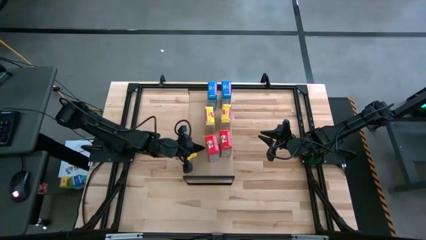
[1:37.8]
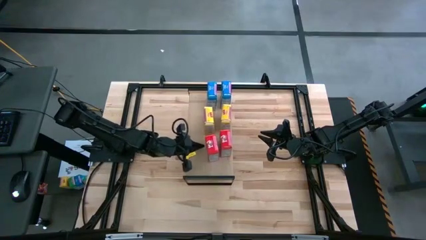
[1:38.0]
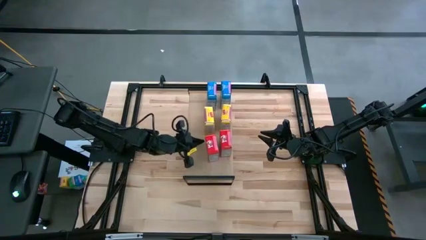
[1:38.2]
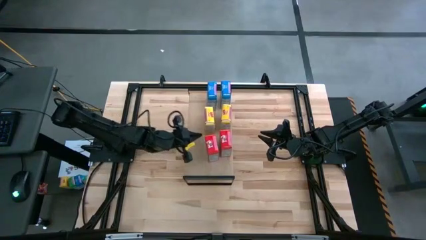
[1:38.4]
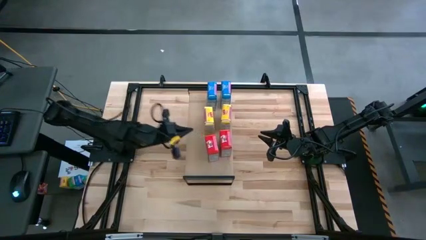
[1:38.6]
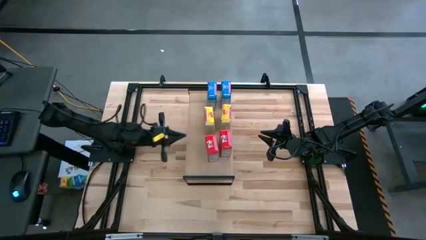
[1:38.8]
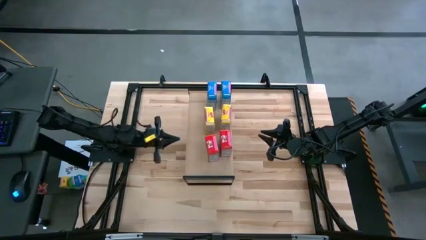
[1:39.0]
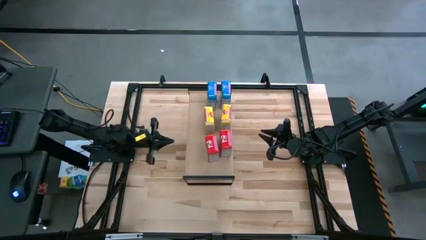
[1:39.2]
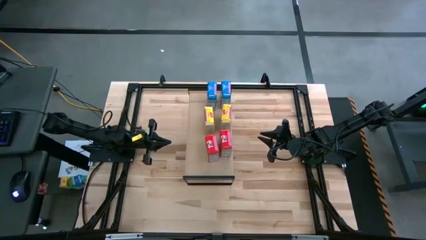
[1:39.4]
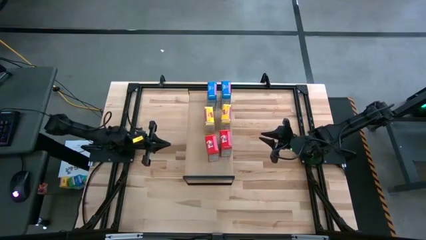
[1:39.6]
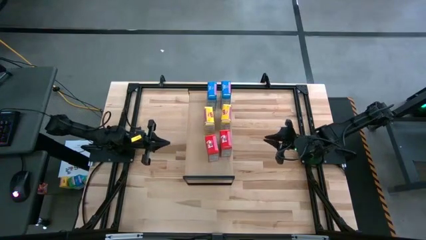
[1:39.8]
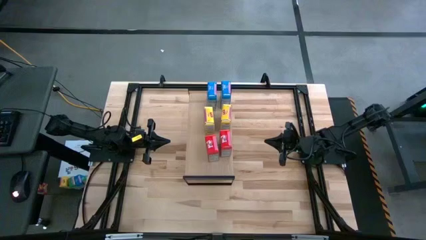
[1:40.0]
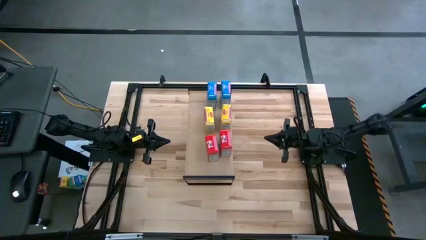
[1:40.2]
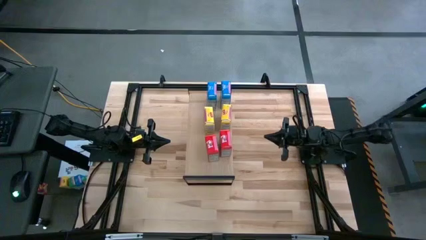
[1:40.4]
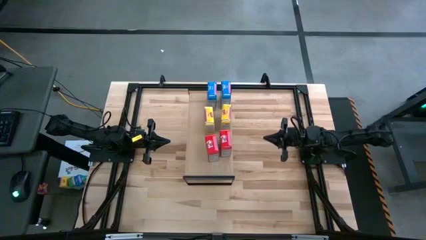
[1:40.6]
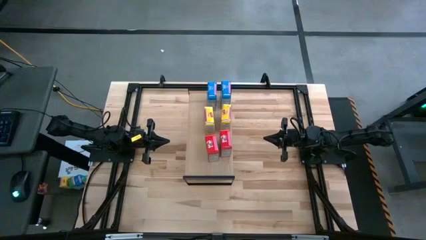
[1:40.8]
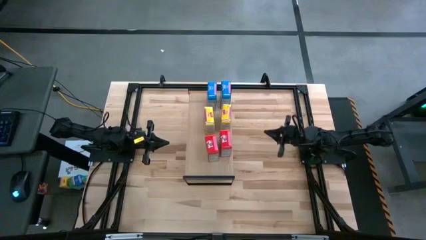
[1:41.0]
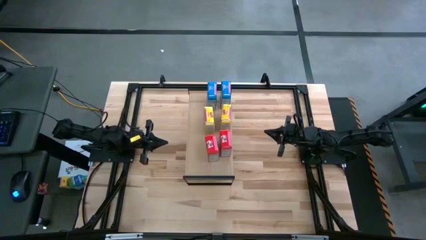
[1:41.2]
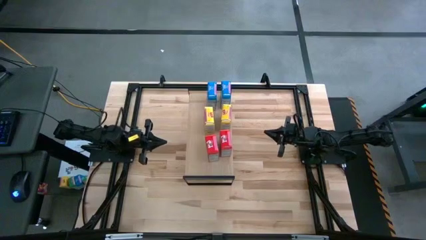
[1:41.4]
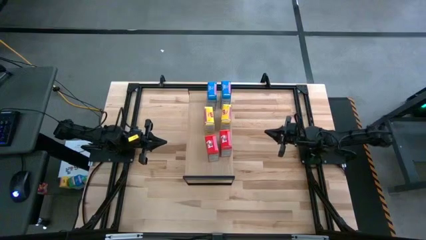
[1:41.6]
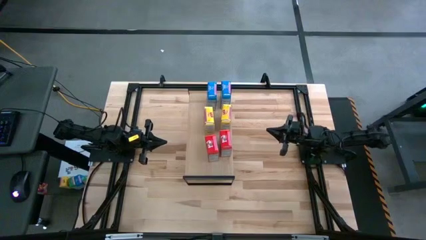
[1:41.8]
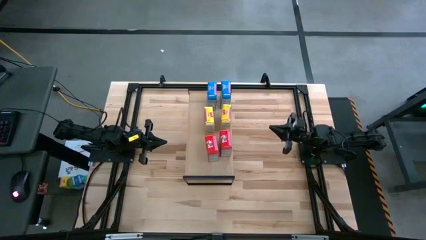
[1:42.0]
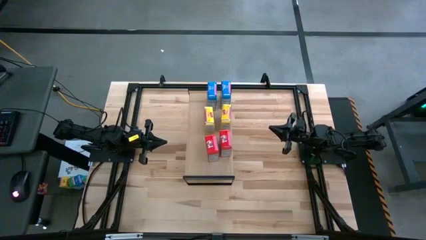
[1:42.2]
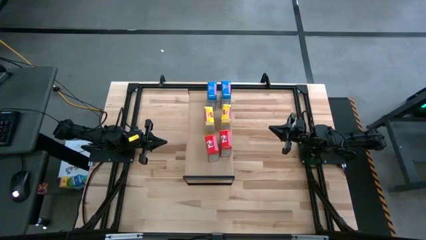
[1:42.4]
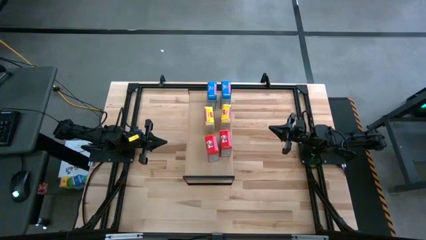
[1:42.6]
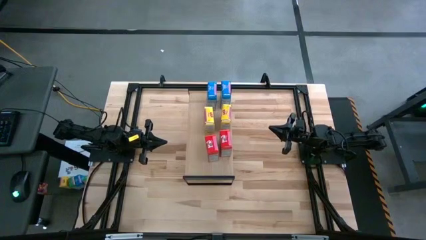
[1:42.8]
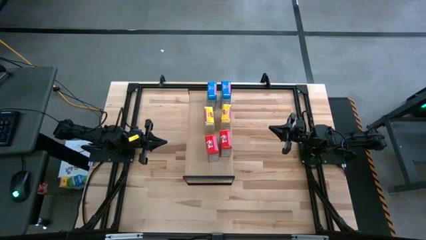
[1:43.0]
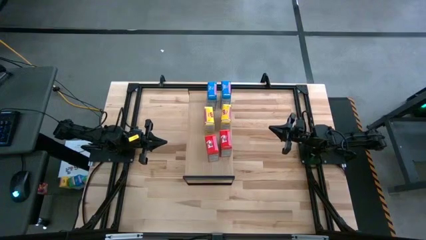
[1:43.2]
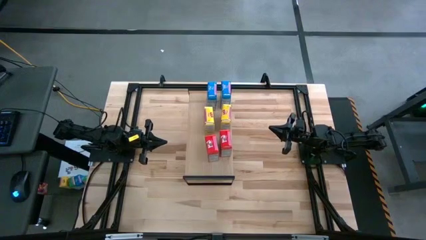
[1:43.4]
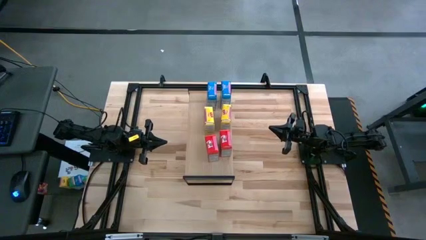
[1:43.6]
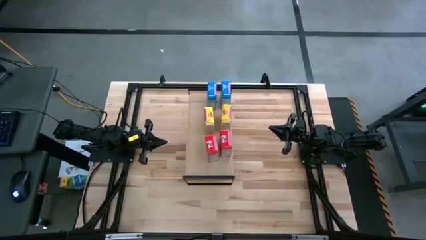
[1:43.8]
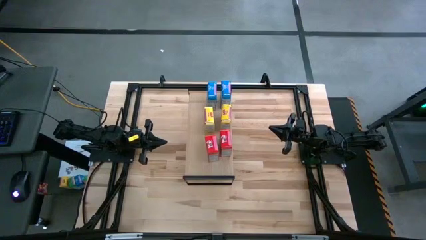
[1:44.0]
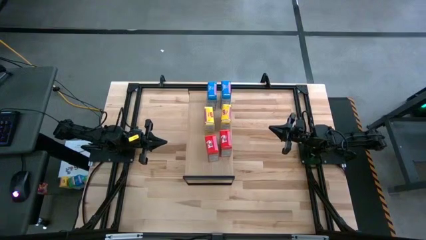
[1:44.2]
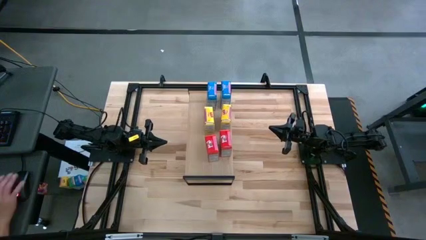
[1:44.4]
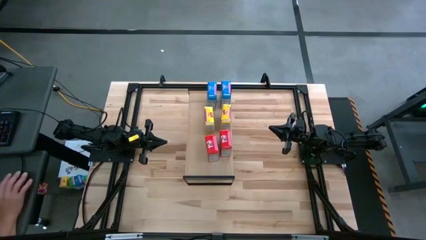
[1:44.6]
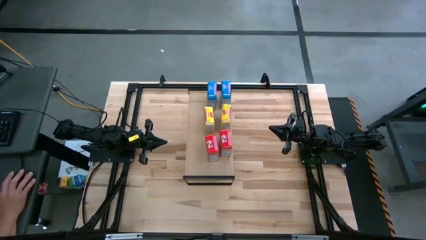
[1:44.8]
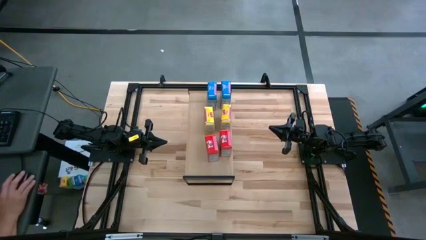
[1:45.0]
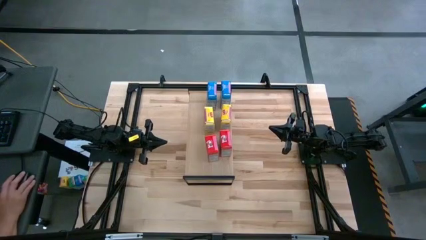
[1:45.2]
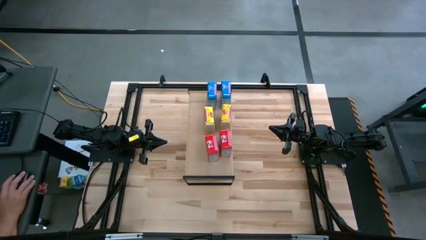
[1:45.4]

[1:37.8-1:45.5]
Task: Stack cereal on shelf
Return to Home Position

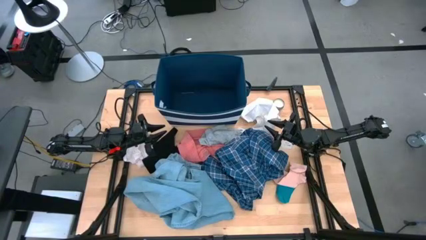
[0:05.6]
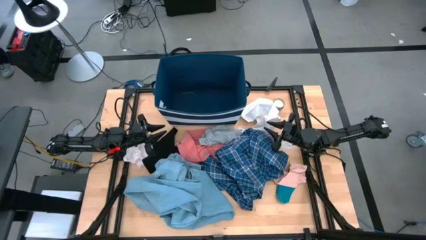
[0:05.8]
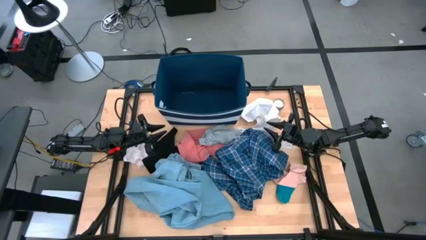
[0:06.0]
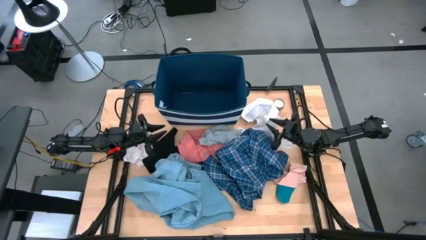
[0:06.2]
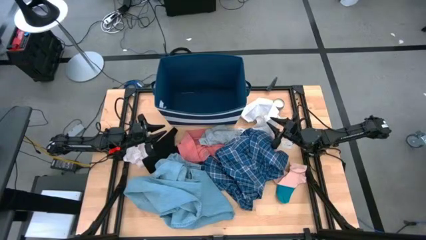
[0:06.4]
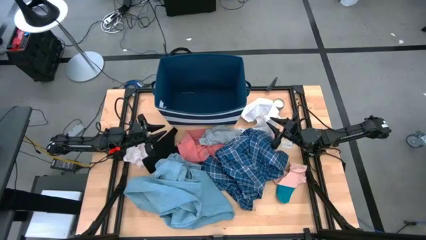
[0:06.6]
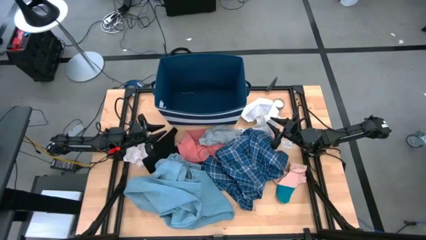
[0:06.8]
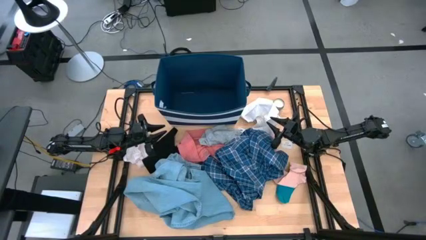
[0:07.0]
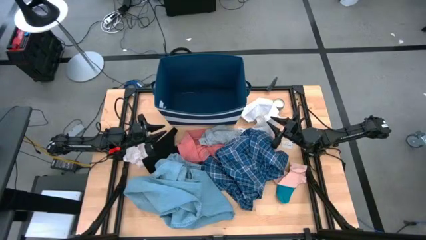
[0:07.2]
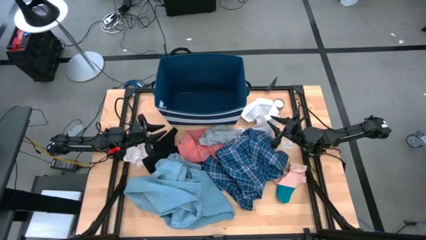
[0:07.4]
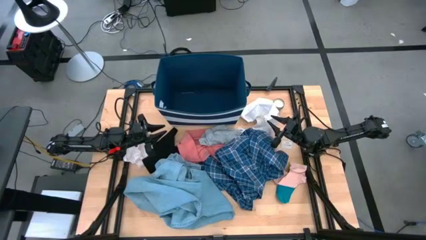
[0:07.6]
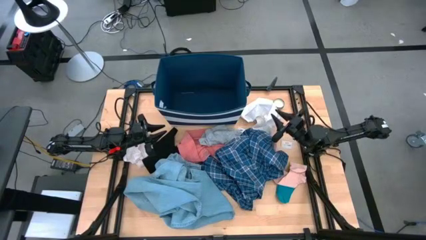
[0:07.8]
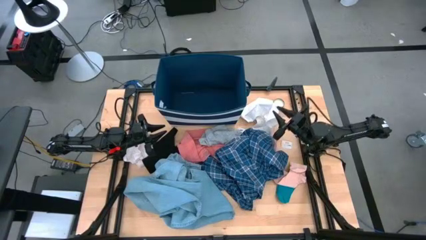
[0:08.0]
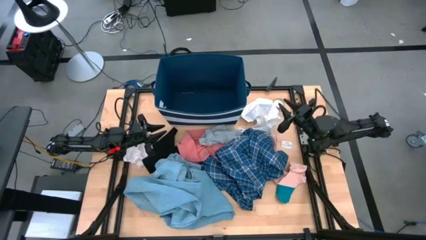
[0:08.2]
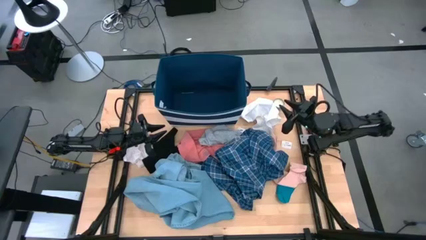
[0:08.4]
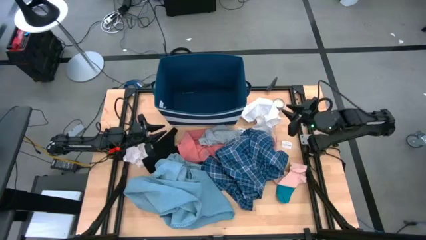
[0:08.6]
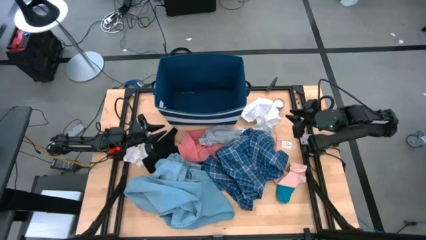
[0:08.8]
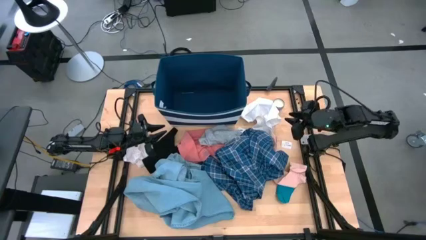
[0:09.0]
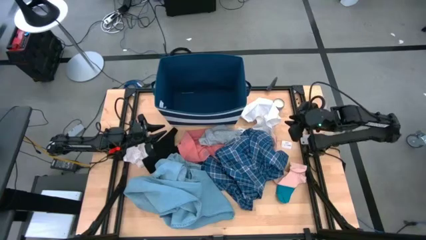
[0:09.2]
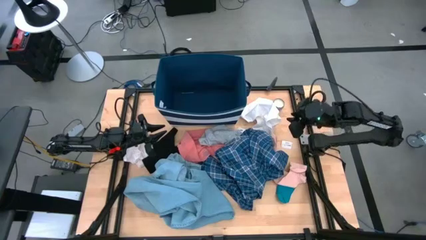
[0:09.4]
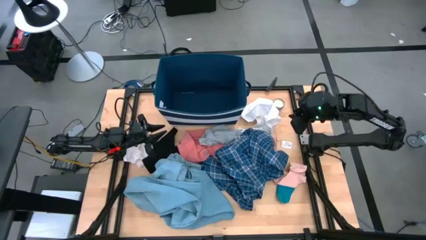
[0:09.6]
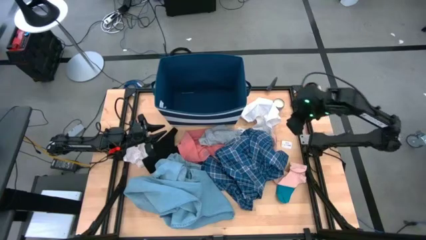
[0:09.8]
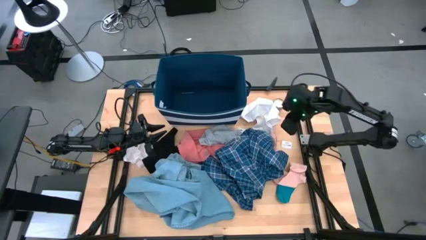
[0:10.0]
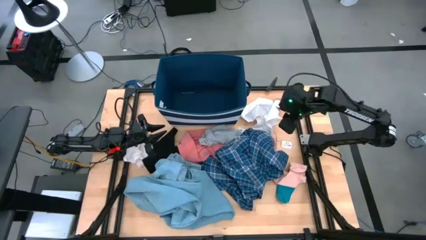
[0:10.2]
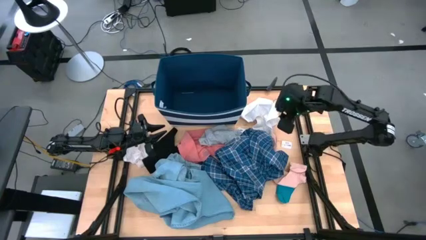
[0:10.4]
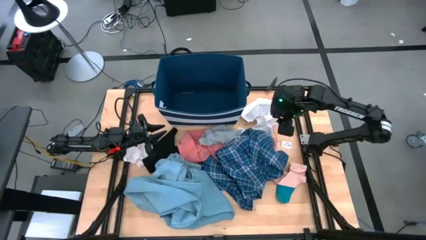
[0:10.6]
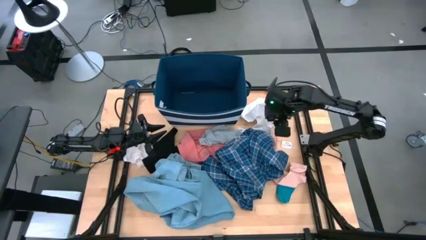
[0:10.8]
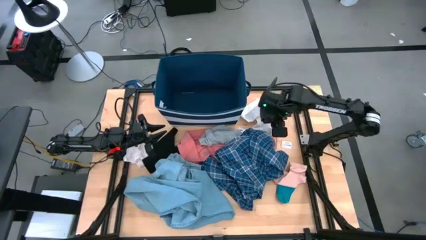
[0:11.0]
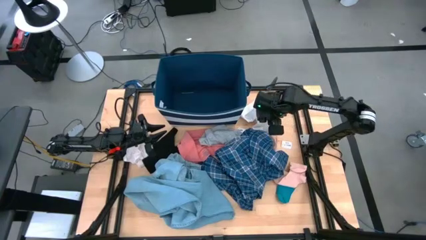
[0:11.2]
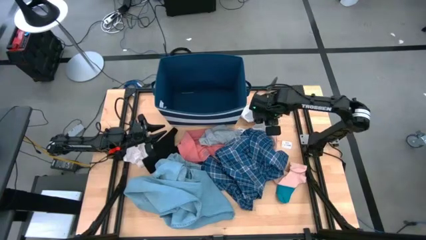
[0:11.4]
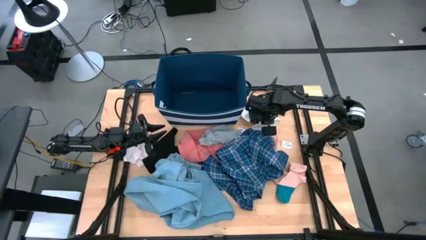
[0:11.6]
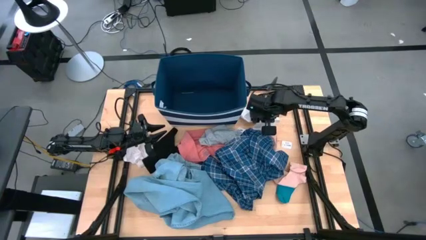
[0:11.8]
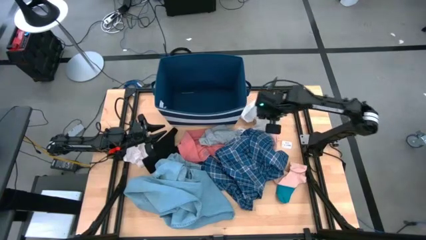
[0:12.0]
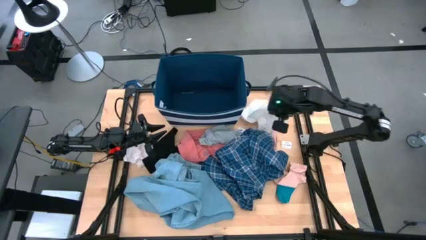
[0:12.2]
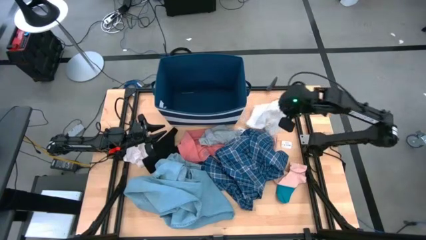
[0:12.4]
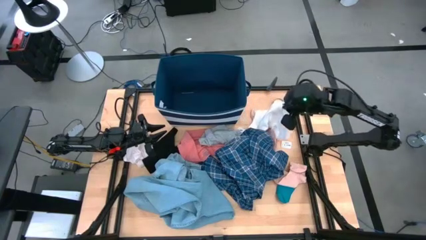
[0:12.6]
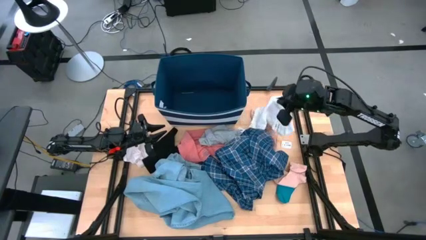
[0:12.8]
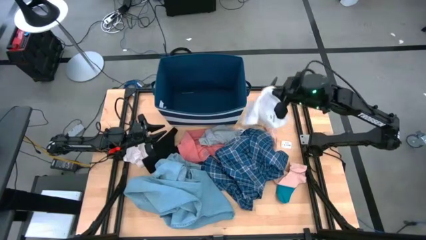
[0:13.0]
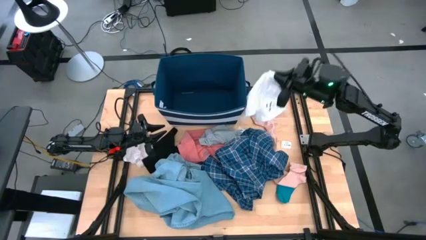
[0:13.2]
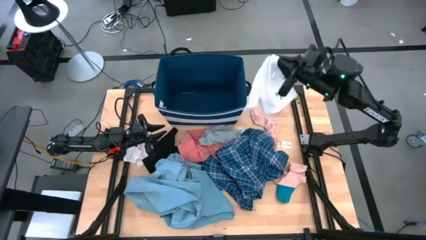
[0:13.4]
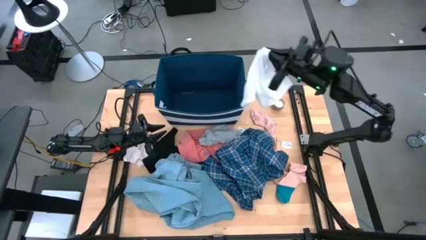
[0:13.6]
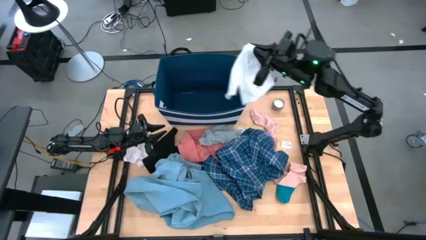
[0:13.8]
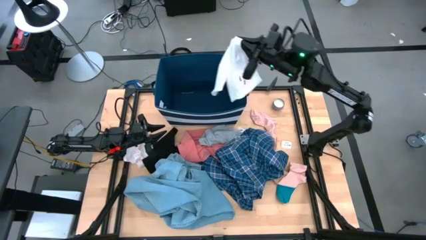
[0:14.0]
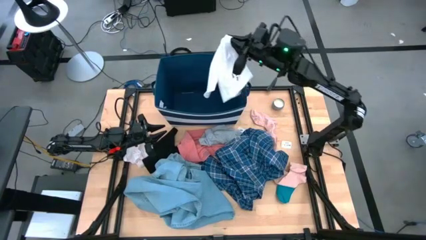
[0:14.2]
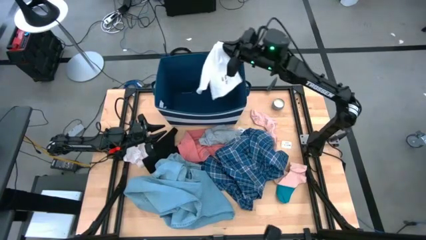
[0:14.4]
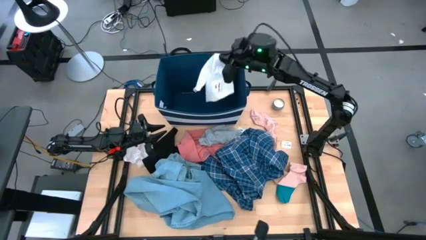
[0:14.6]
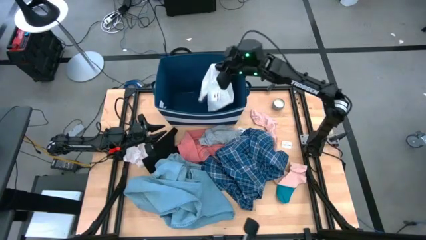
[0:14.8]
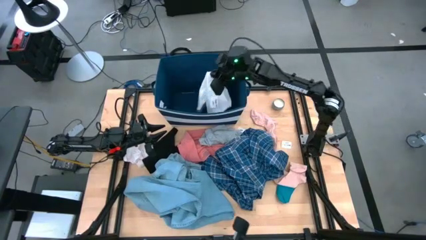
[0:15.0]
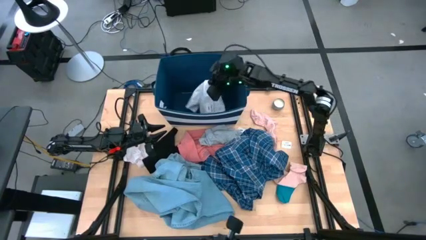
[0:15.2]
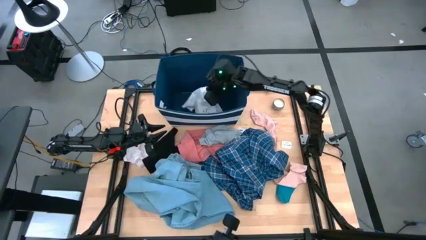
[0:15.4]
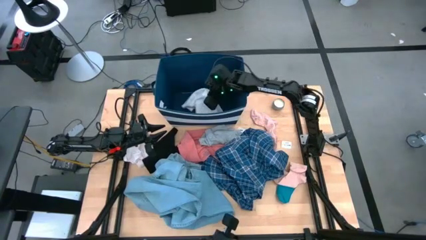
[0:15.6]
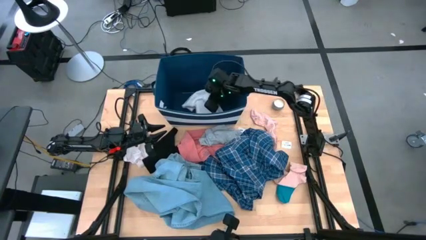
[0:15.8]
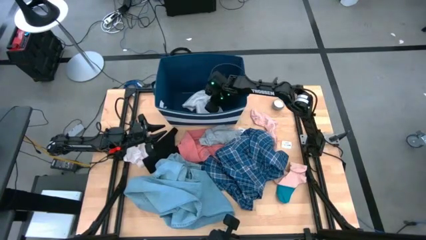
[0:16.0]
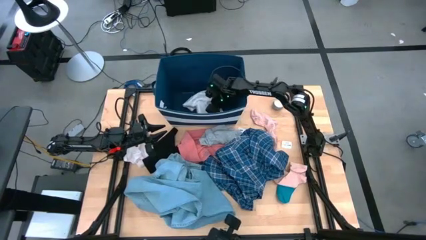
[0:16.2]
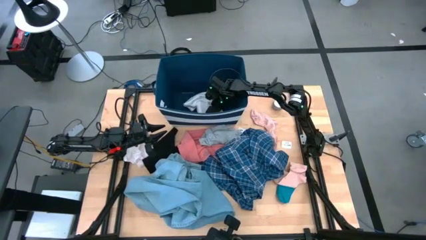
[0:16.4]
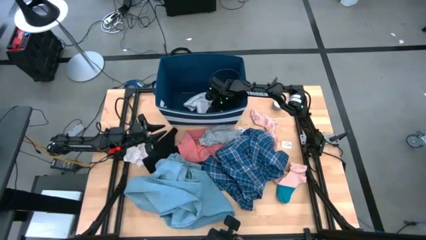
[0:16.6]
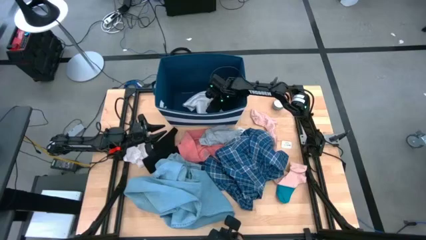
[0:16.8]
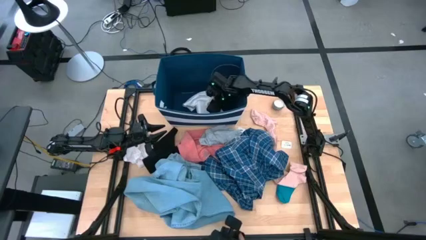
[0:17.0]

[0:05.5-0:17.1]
Task: Sort clothes
Put the white shorts into the blue bin
